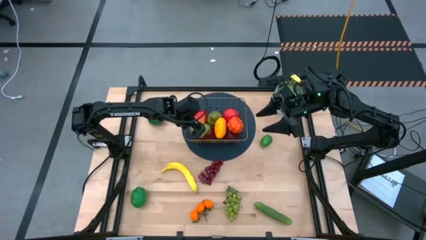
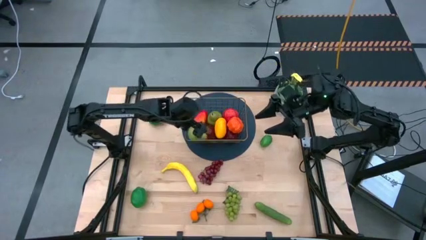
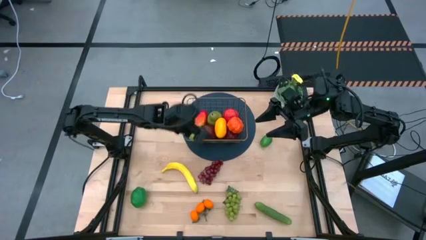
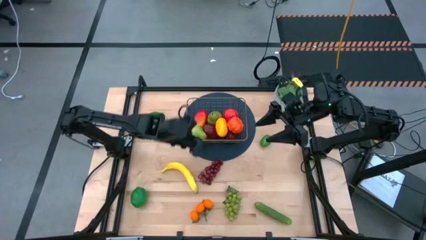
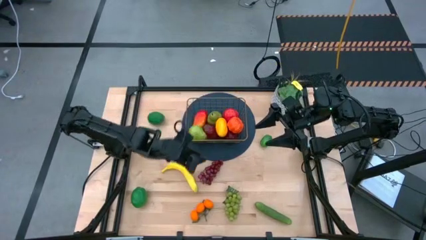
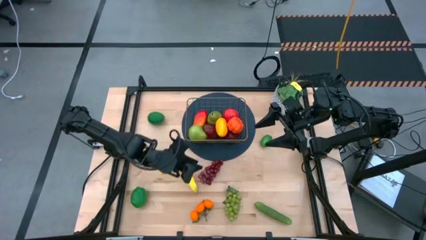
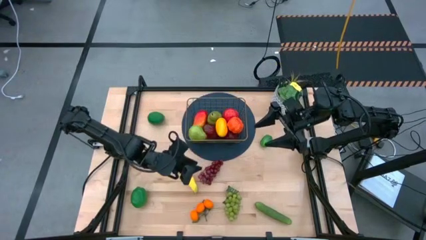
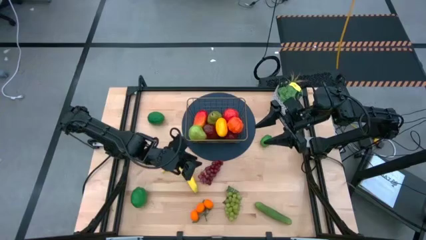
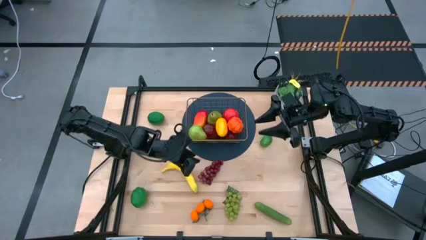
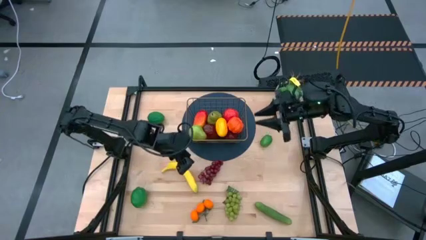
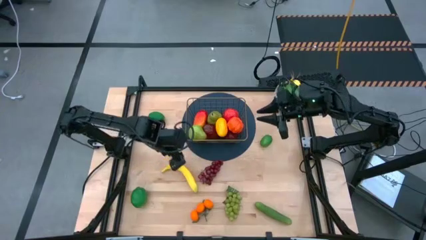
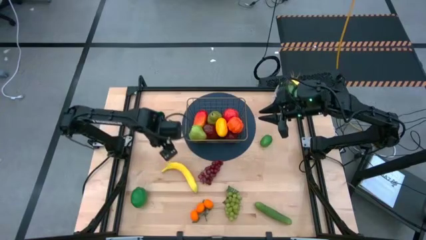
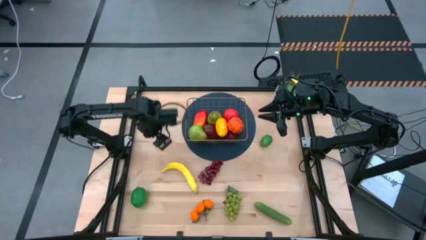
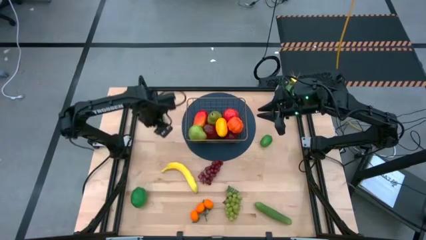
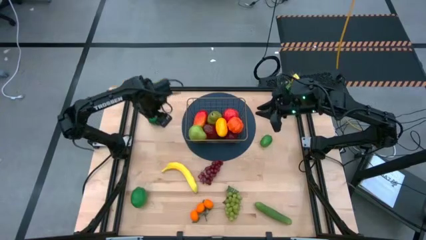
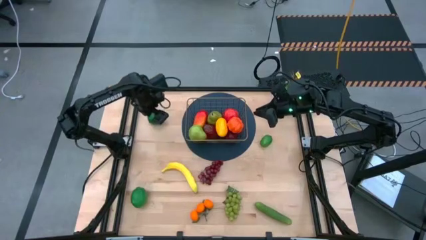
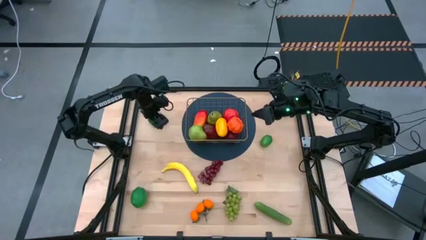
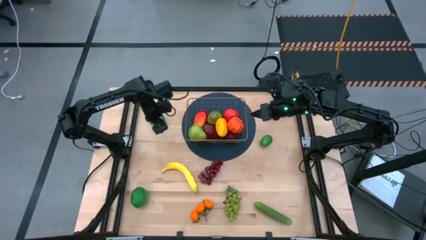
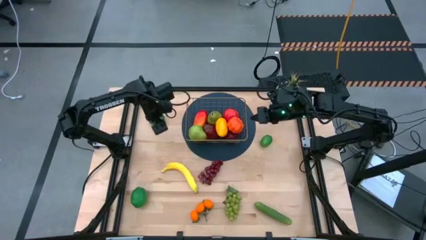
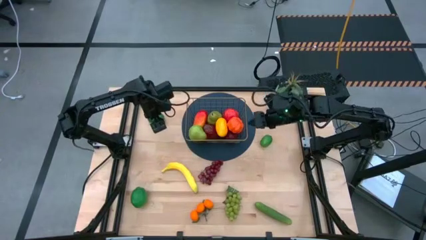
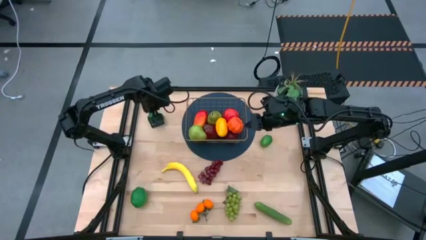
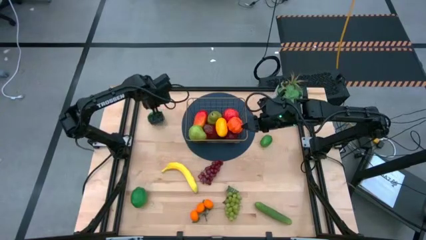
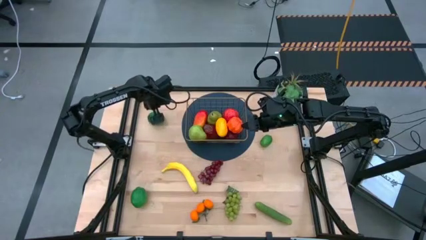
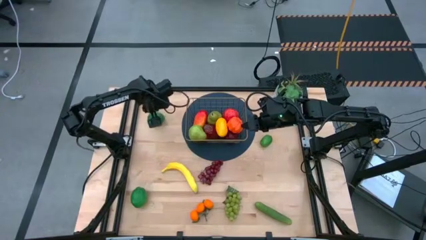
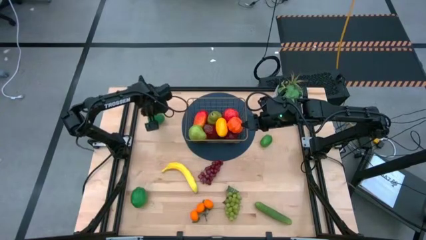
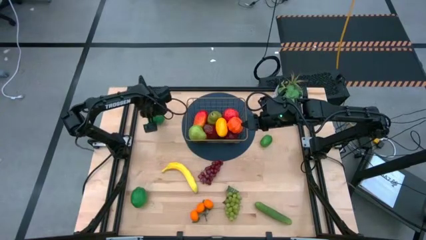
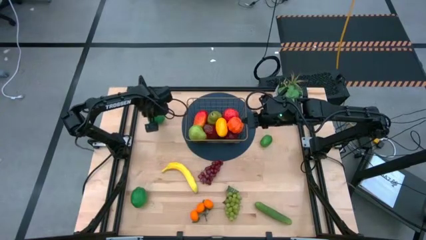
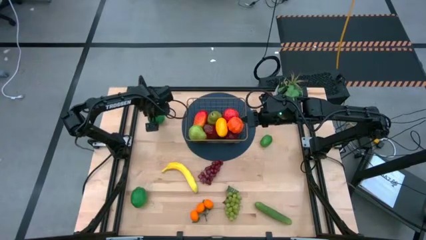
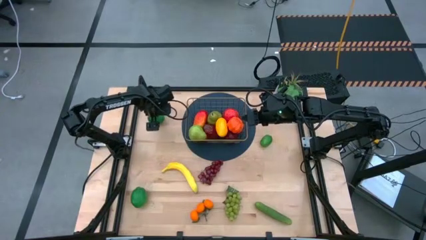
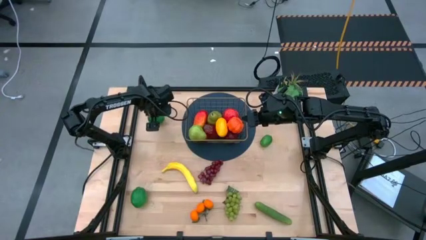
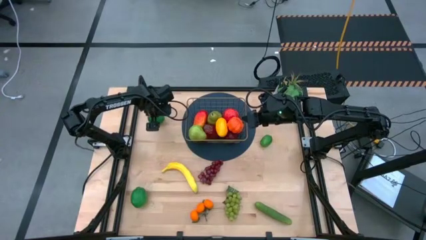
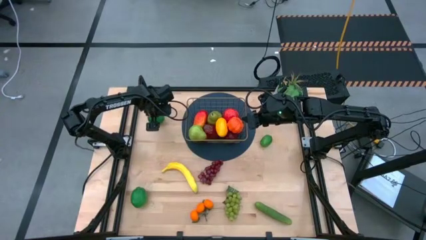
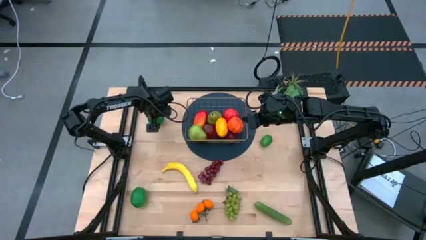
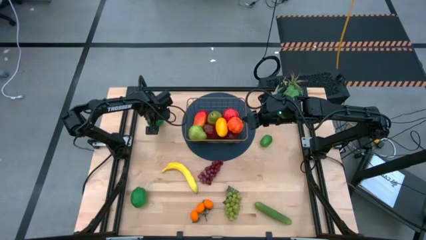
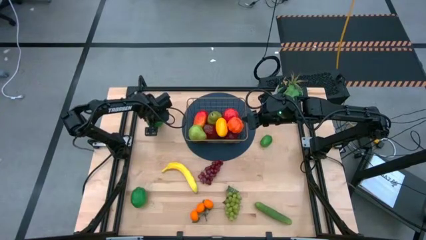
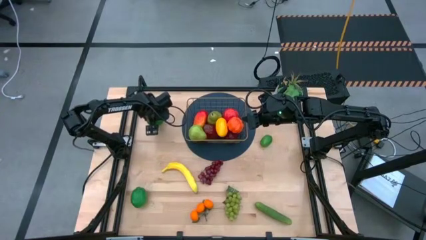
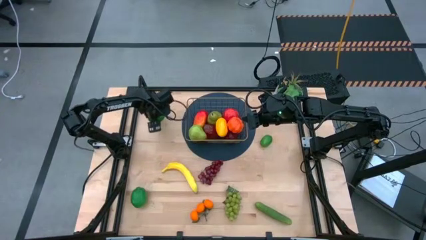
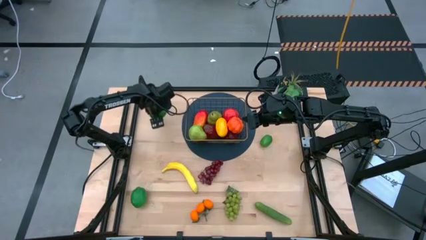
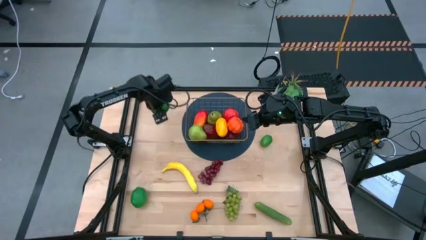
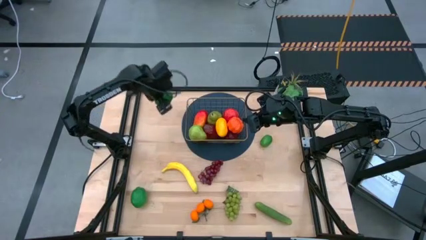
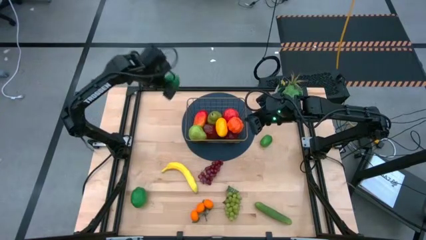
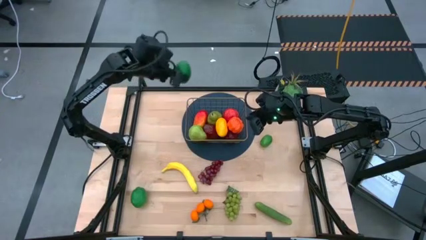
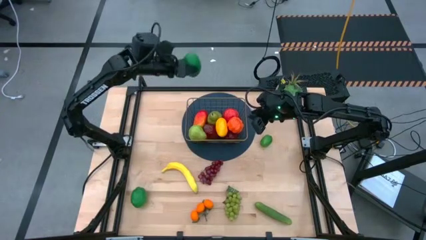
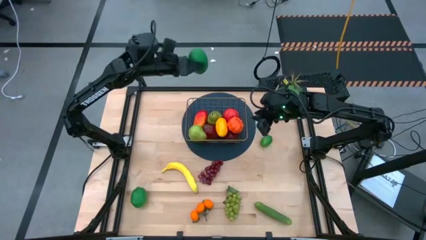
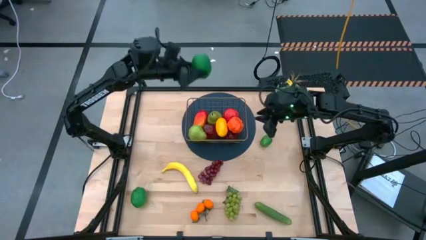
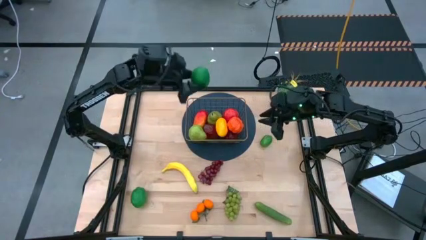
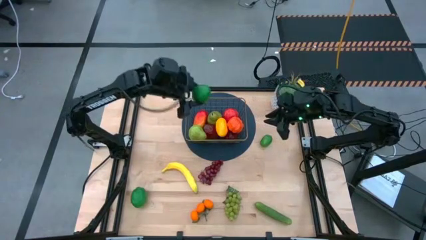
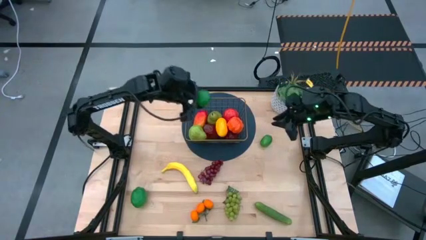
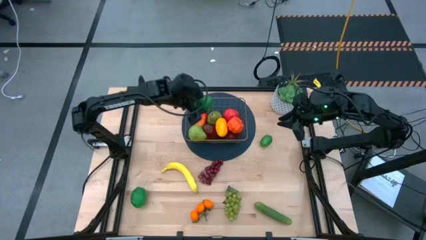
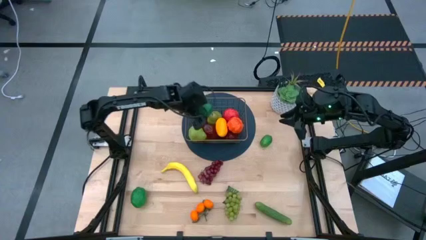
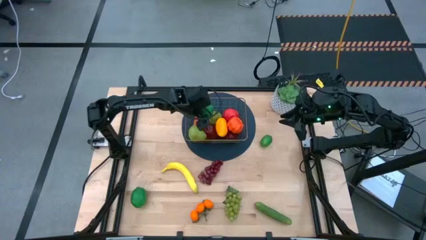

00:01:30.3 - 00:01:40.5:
Task: Build produce basket
Put the top left green lime into the wire basket

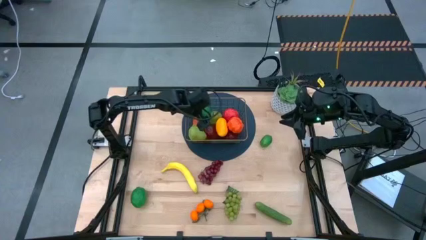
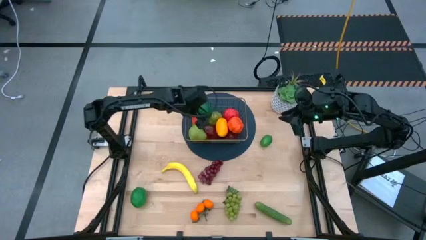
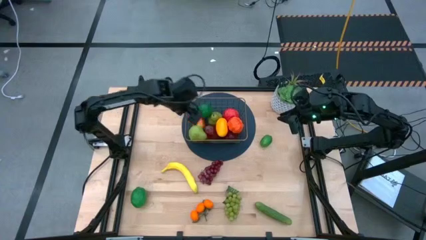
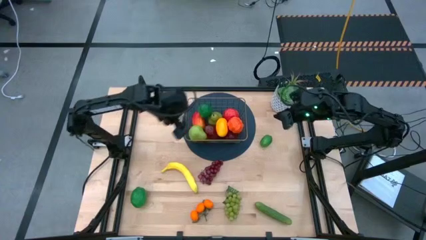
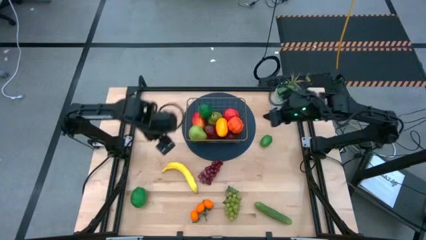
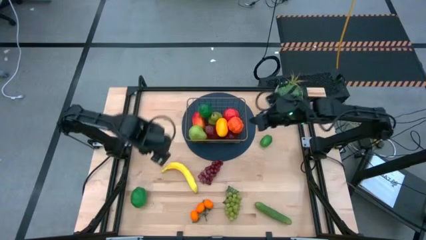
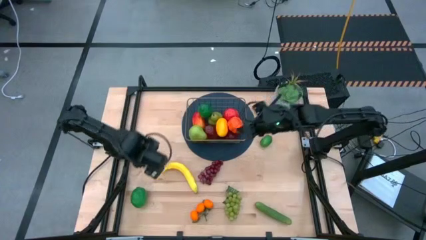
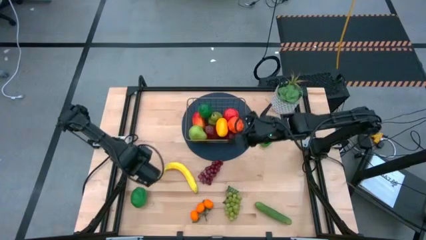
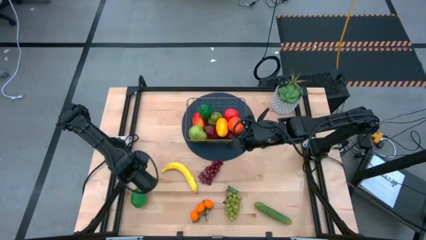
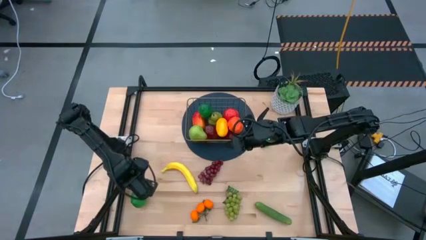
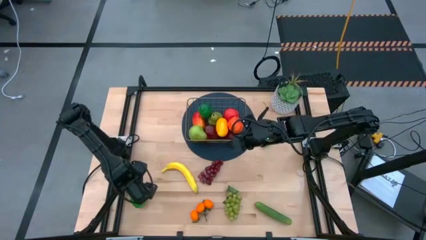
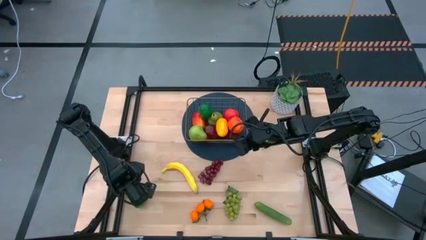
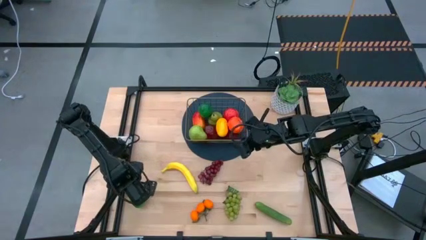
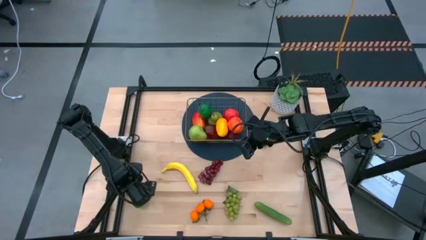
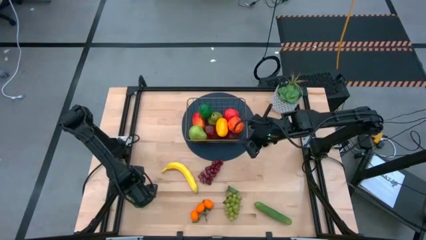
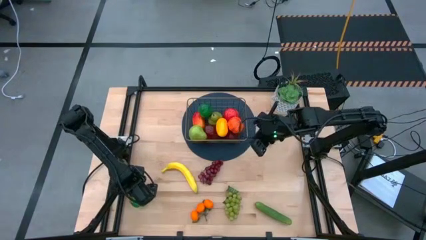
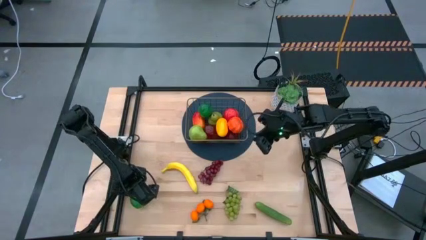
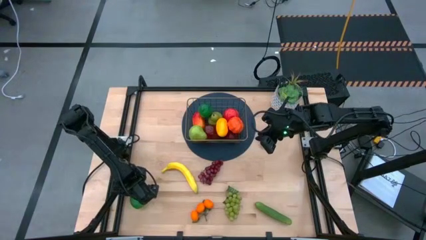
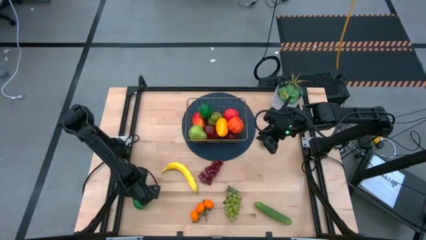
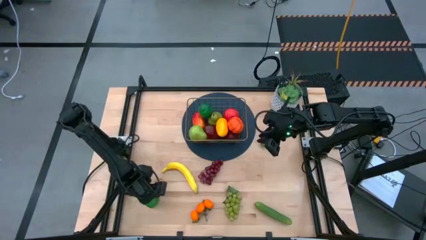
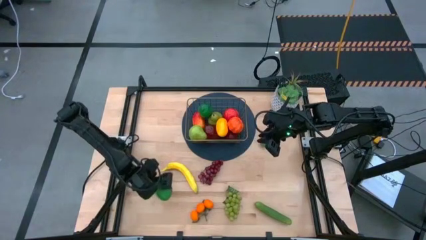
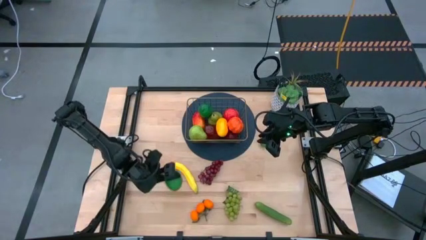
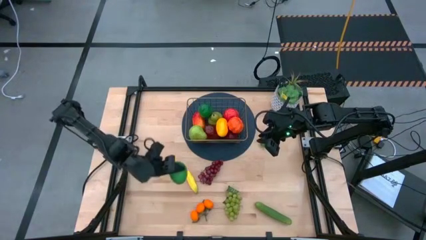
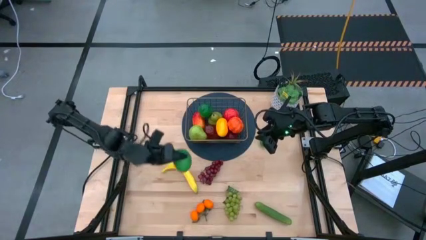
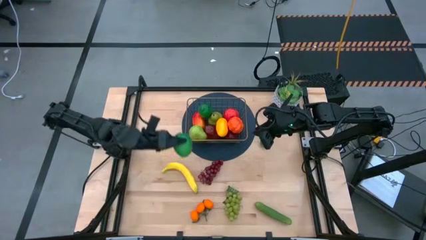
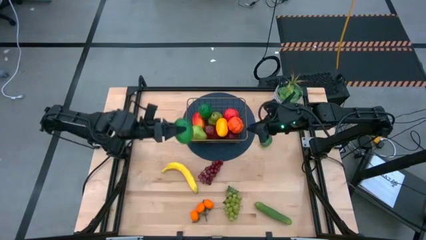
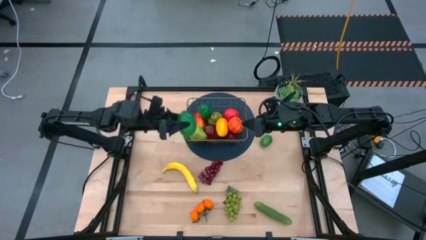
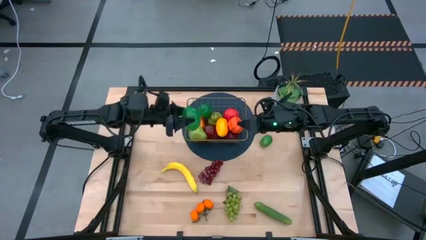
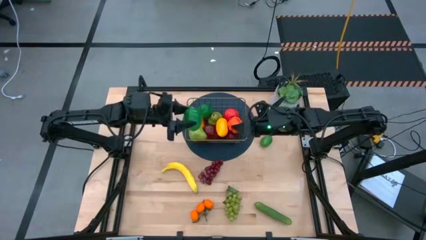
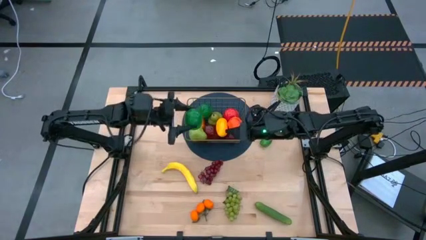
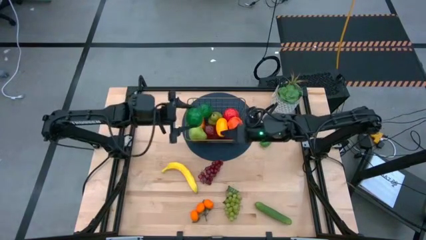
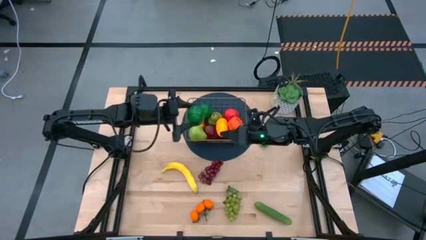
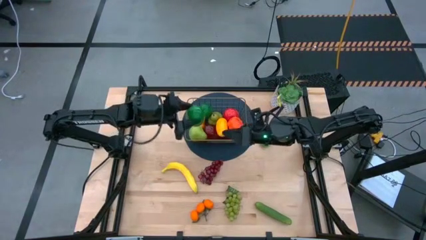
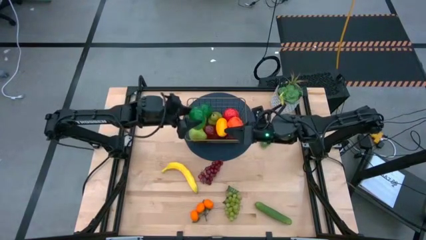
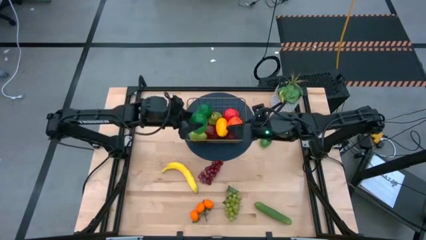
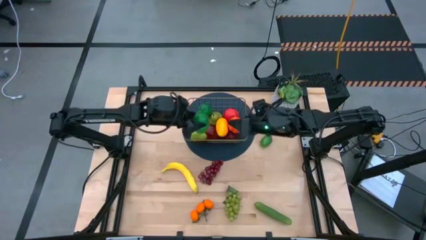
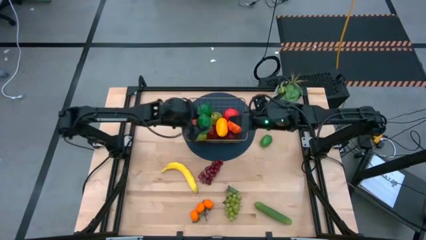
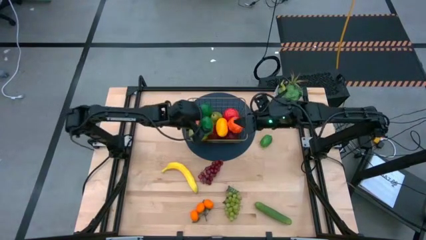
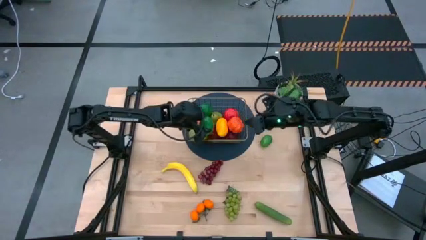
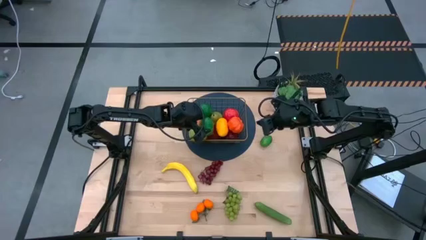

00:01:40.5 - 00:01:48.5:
Put the bottom green lime into the wire basket
